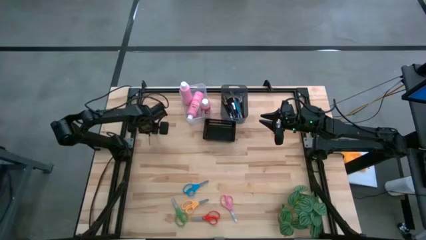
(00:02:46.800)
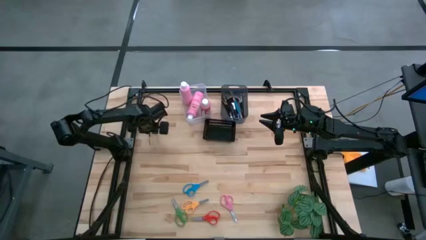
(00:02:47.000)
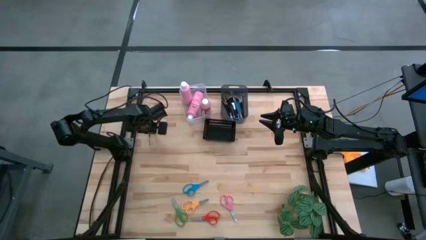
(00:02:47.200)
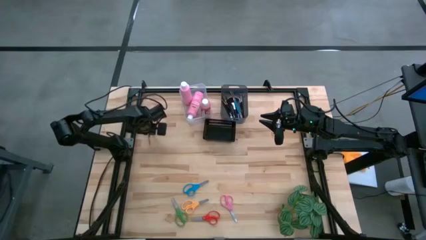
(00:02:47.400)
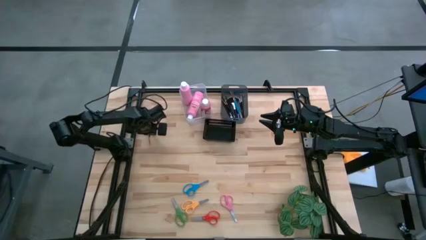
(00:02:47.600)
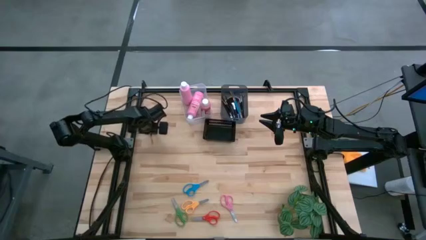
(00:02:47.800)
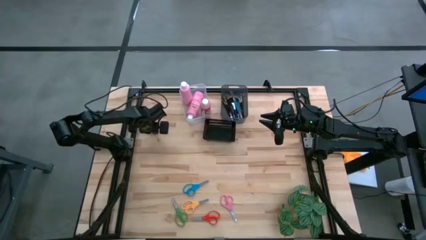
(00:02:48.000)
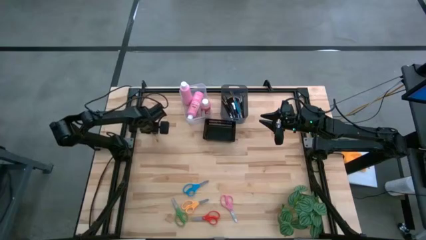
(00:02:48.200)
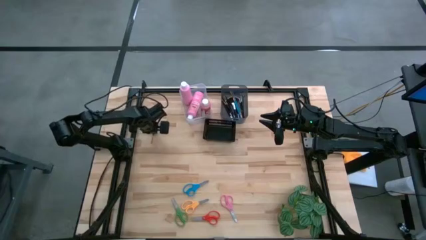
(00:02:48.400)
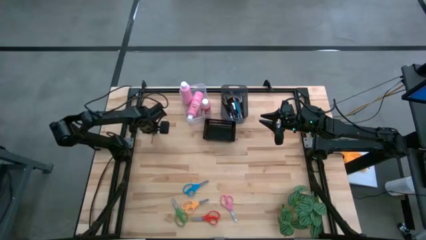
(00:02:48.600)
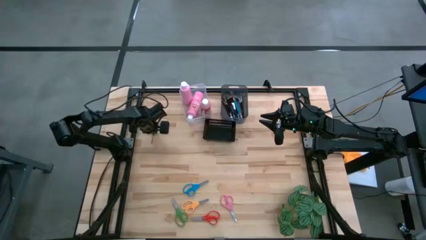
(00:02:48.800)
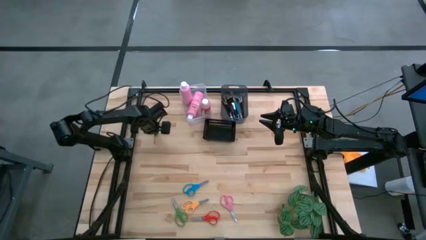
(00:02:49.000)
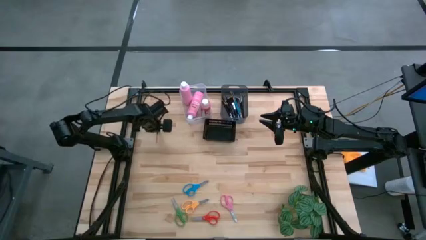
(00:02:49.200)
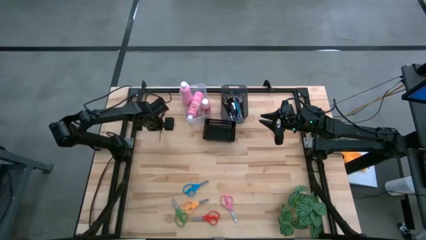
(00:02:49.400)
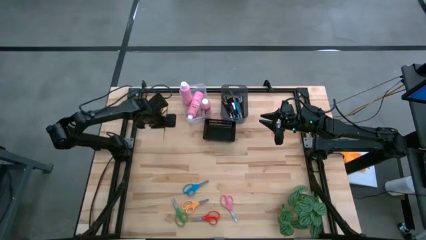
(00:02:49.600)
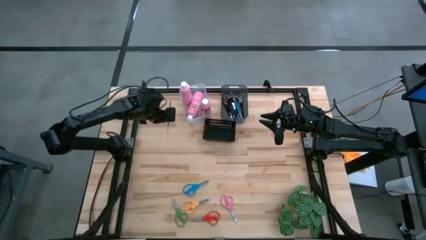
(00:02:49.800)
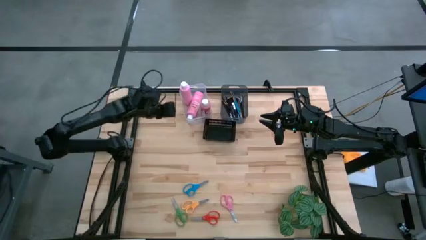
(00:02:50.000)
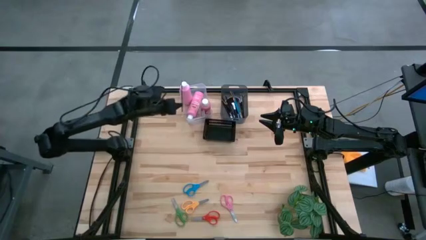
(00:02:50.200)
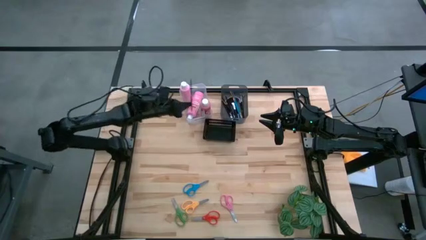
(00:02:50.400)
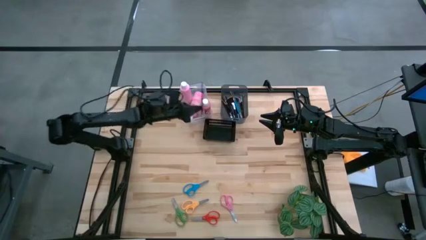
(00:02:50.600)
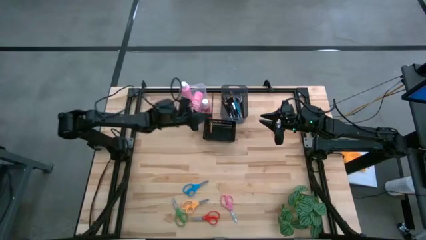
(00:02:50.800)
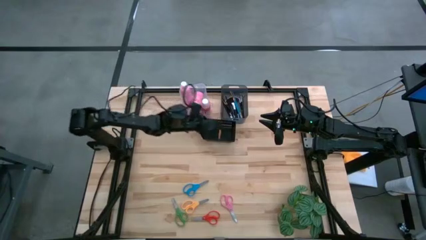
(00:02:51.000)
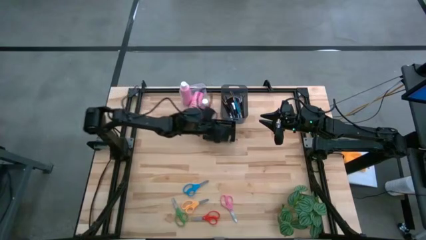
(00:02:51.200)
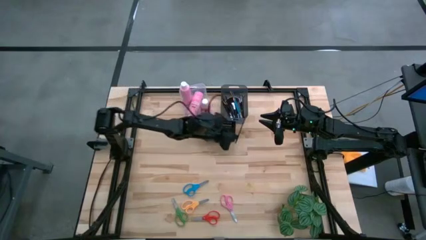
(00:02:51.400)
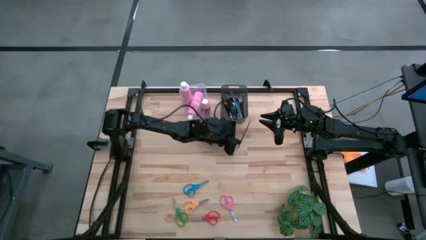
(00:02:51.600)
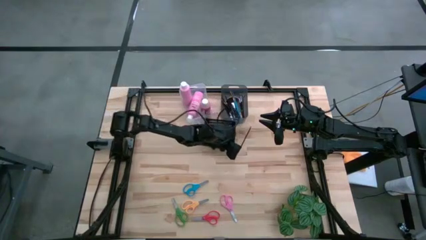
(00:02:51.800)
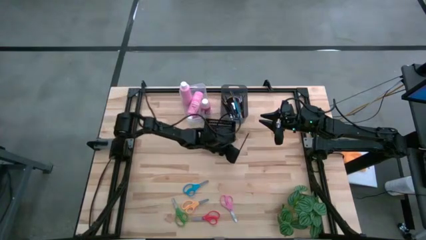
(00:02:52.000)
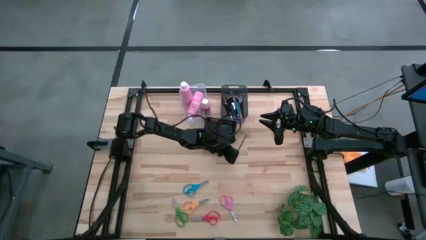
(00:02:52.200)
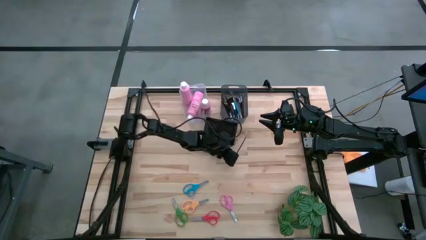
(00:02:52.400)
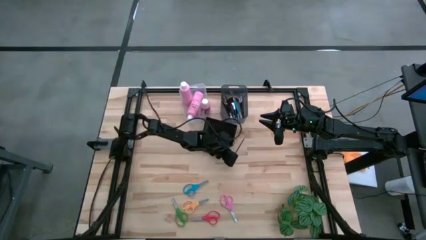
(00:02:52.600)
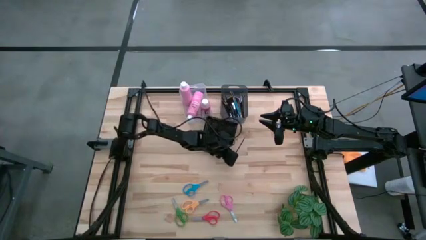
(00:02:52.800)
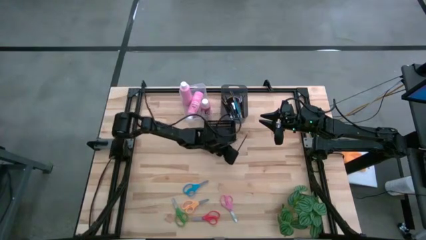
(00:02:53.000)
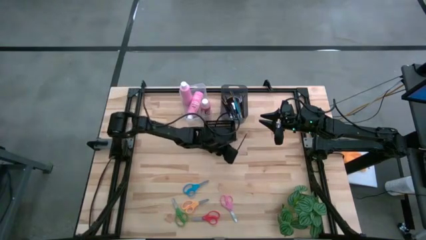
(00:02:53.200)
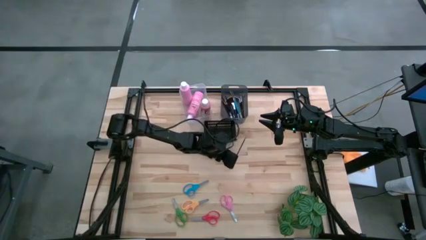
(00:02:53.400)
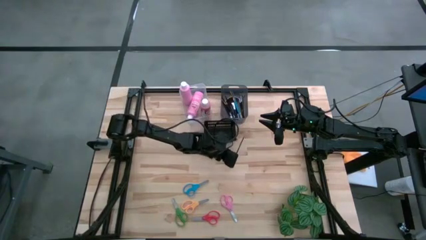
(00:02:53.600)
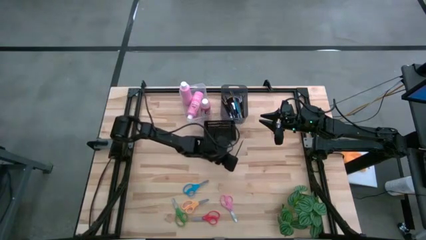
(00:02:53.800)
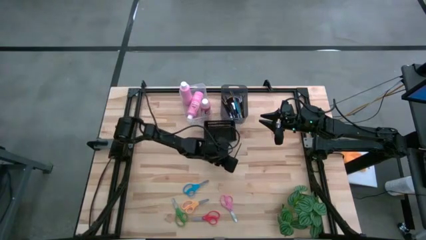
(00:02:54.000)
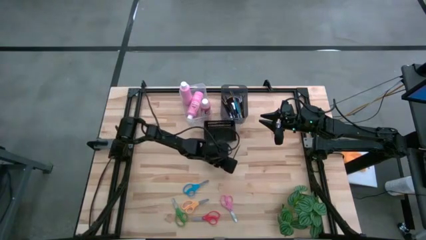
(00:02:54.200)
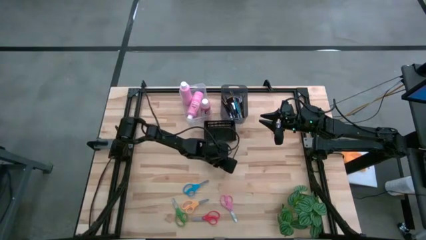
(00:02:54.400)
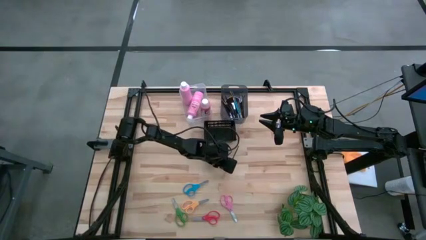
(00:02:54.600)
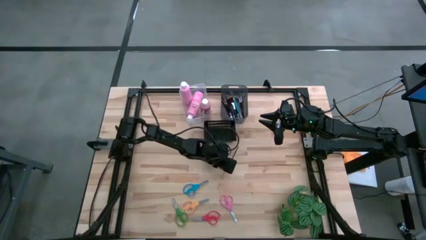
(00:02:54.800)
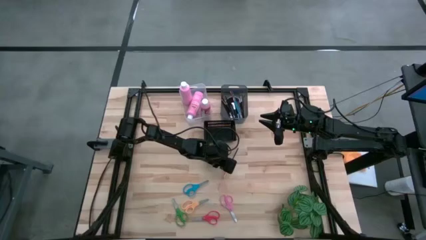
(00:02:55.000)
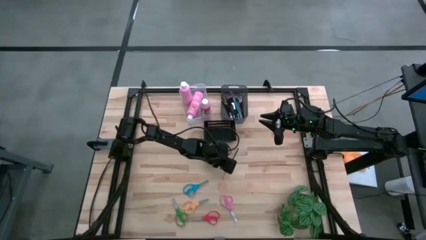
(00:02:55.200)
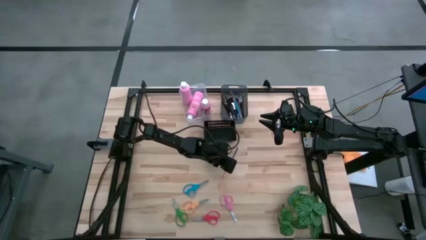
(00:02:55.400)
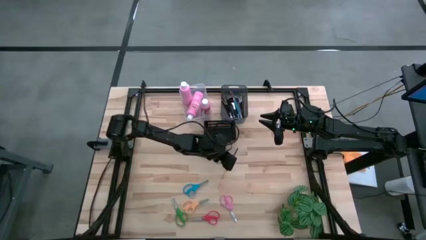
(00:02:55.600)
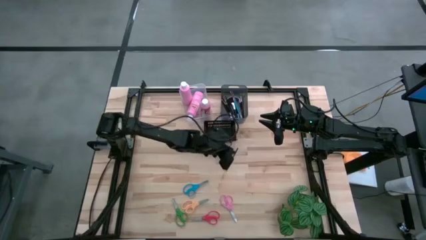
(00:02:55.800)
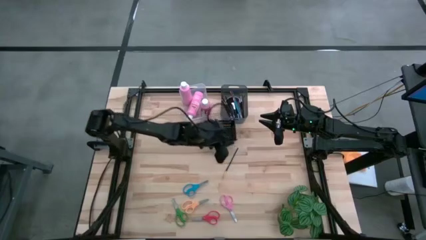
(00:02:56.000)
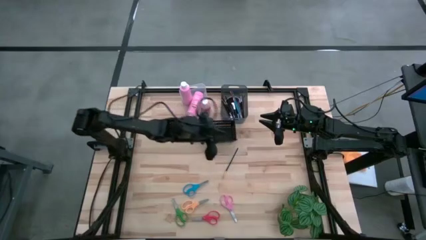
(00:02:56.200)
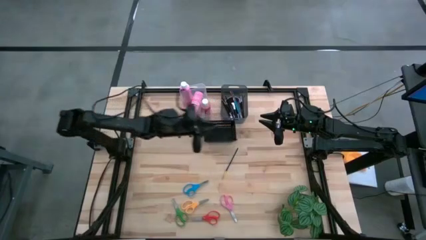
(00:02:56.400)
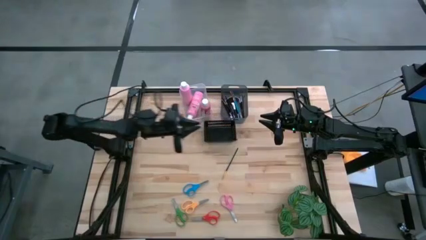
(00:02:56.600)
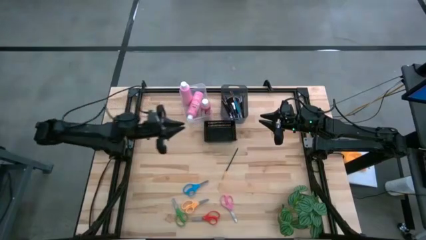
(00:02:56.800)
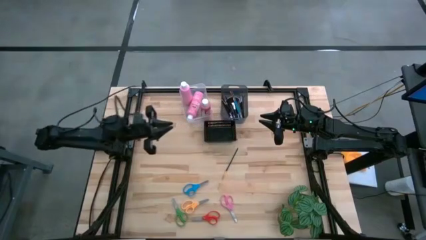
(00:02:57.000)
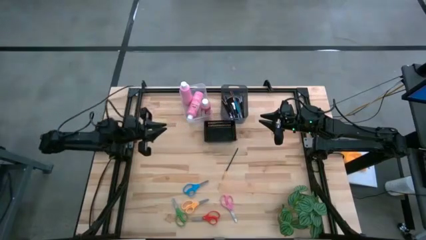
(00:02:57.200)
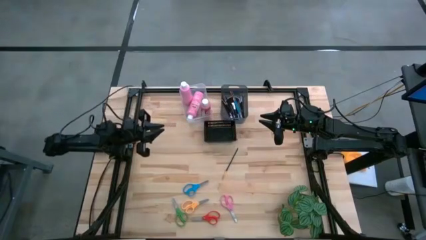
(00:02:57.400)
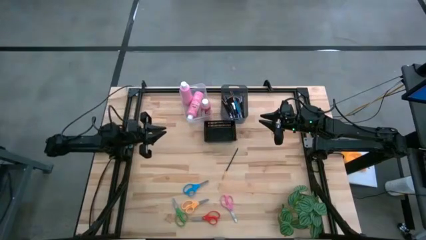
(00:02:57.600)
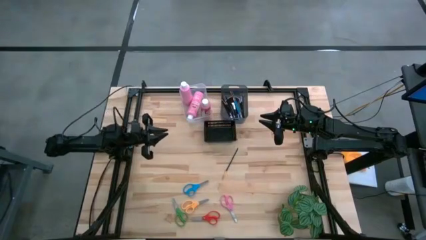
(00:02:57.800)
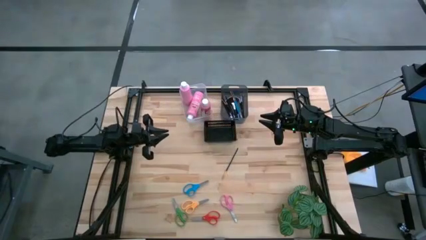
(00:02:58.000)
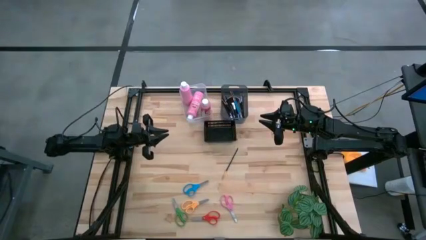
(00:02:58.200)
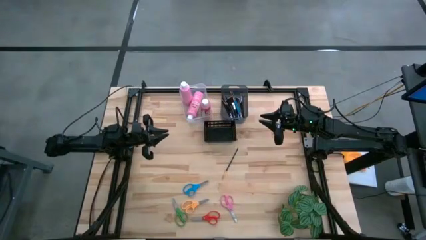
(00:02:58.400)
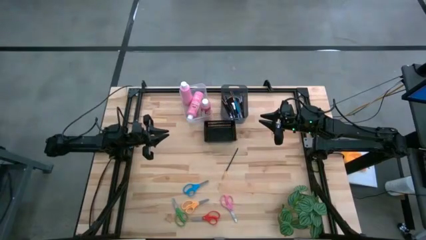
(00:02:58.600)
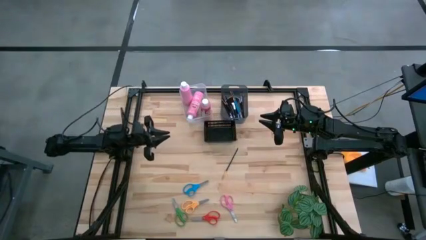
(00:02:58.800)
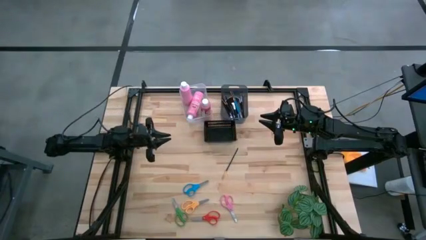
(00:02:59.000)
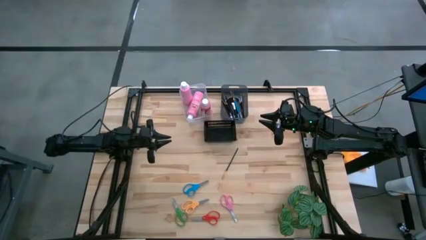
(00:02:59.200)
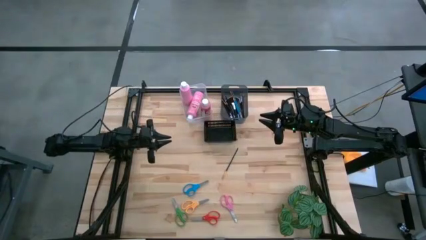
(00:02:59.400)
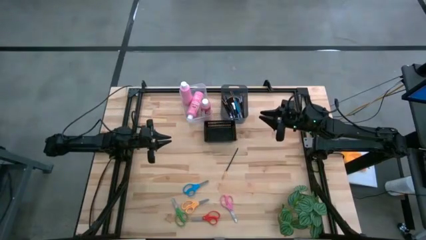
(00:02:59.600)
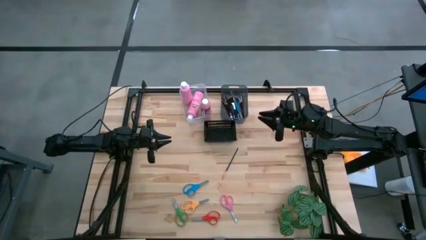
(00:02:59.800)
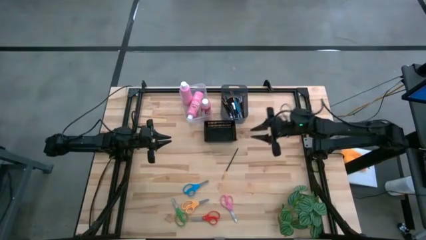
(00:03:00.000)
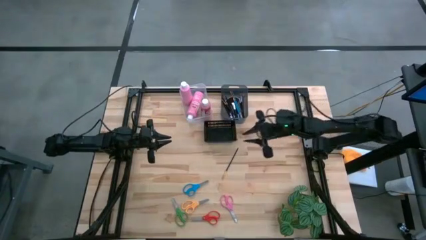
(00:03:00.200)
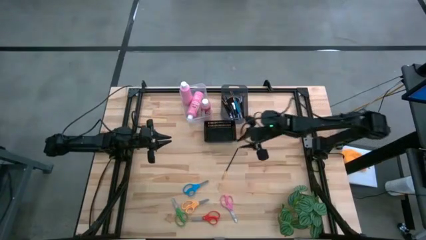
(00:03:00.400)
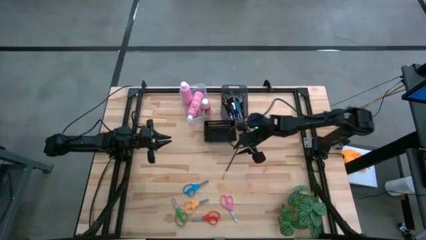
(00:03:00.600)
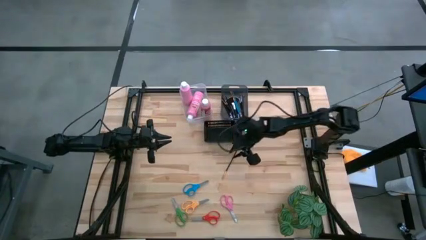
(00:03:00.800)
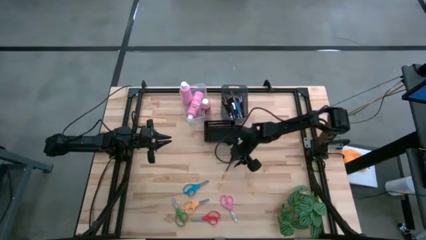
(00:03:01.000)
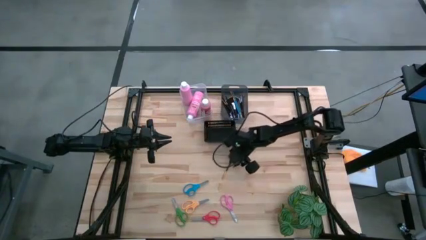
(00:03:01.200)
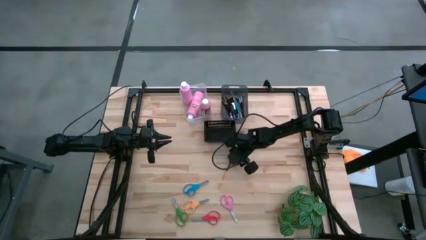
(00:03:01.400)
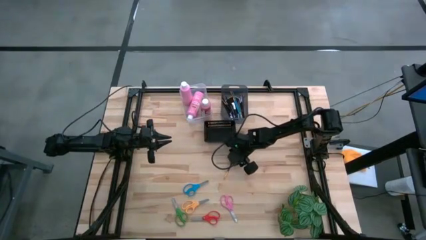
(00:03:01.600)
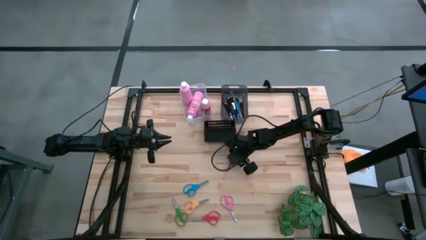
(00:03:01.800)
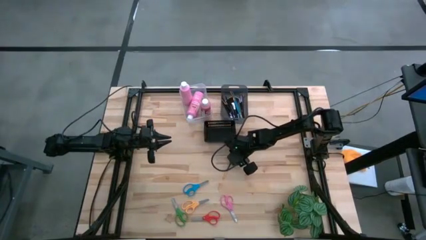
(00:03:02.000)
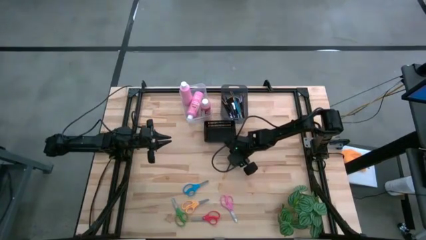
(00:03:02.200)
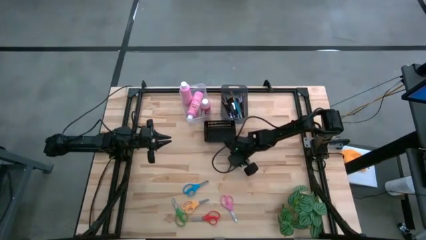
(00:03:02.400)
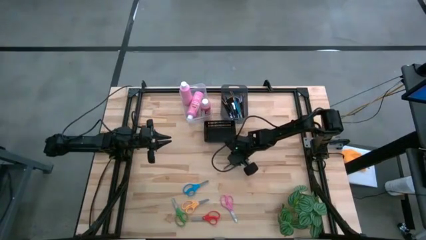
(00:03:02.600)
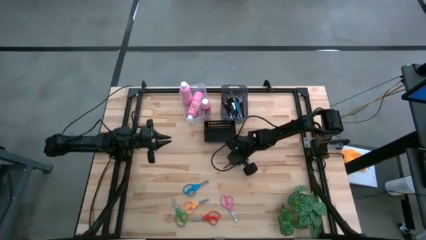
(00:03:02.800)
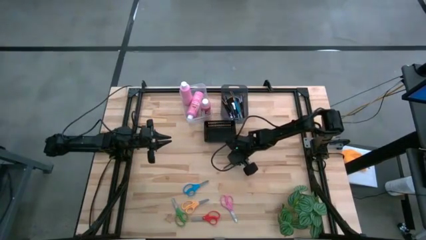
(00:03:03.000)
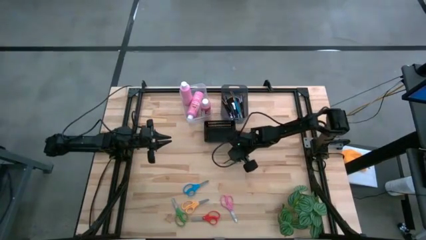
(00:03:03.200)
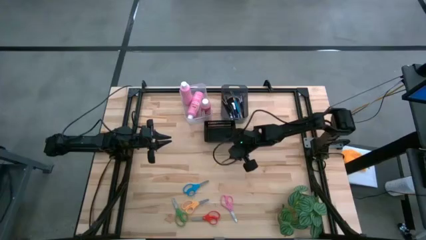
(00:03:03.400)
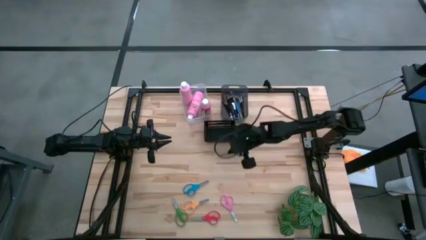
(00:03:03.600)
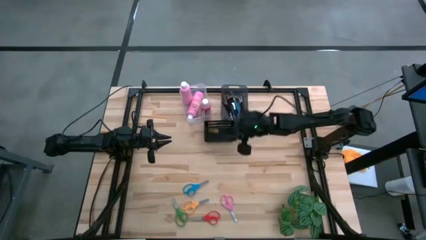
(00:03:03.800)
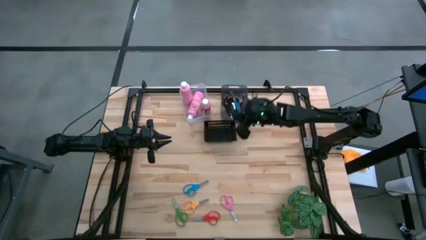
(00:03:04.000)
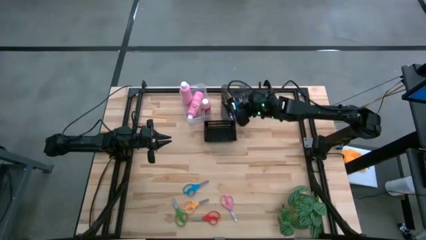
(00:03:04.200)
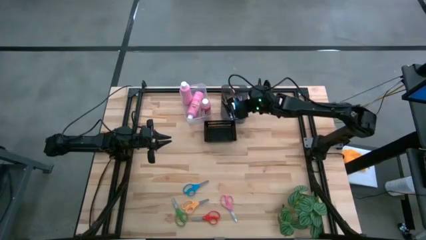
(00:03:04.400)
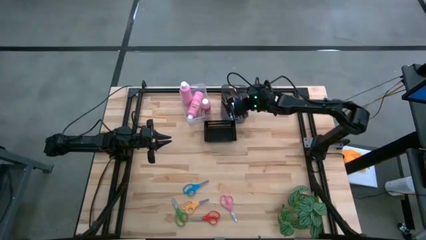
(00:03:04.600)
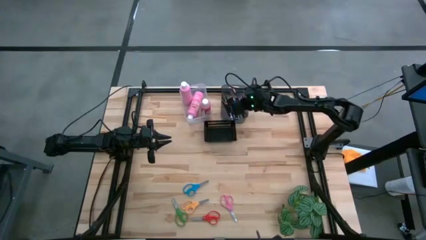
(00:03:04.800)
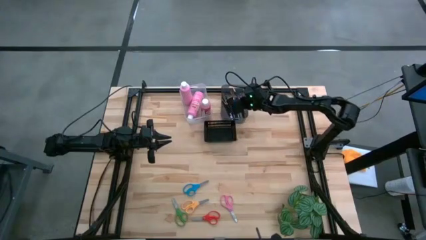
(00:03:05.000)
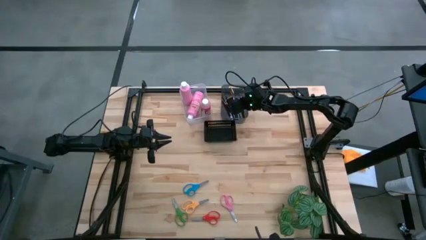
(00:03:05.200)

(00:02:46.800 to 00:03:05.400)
Task: Pick & Place Paint Supplies
Put the black paint brush into the gray bin
